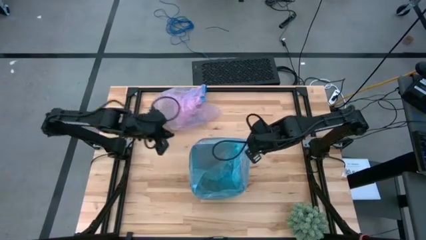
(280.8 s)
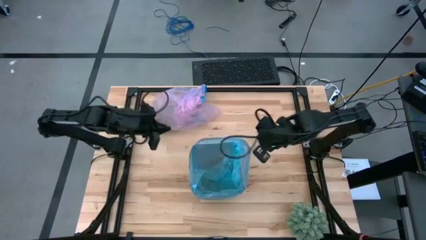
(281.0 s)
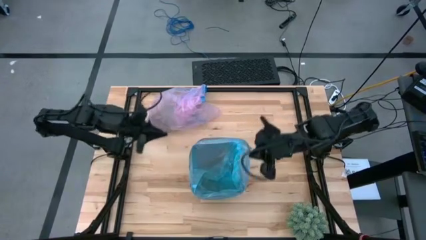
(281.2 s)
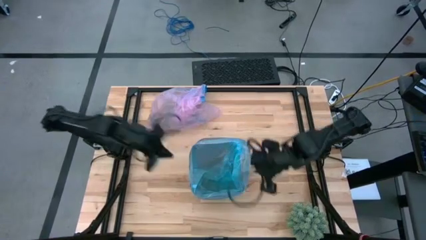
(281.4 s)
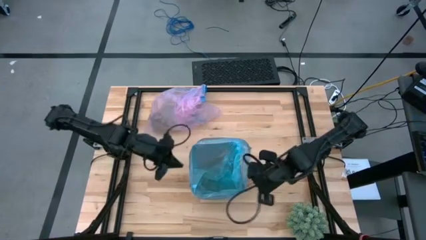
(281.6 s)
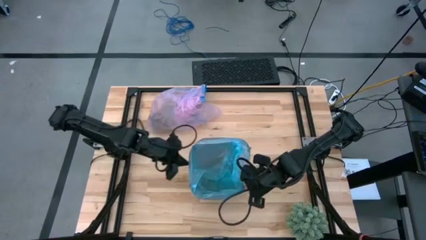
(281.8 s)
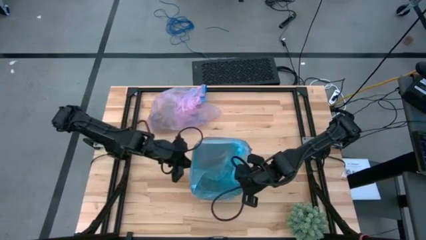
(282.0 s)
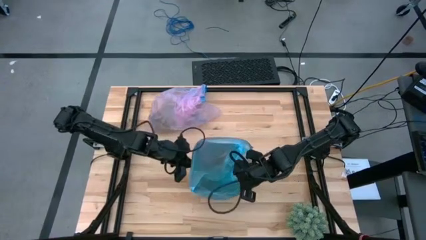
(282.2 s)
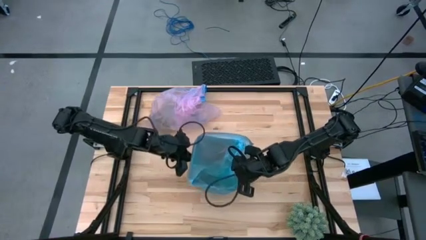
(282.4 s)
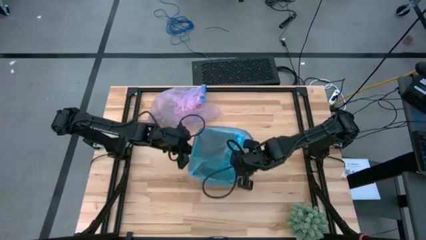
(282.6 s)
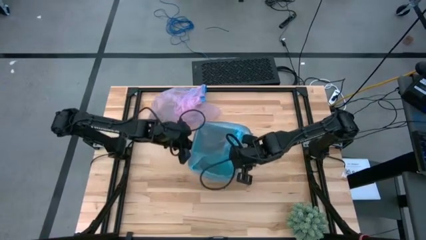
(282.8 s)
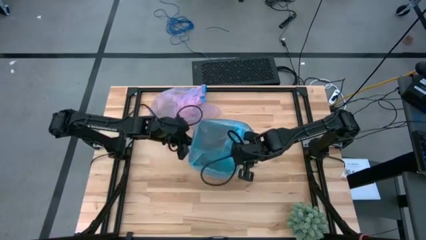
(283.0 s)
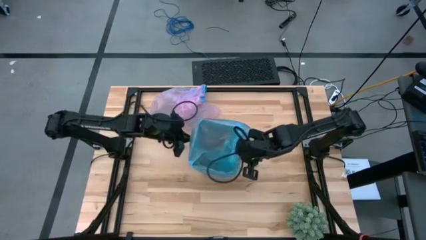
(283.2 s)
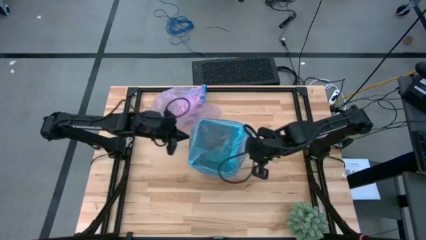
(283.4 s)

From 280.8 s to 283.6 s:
Task: place trash/remove bag and relplace
Adjust the trash bin

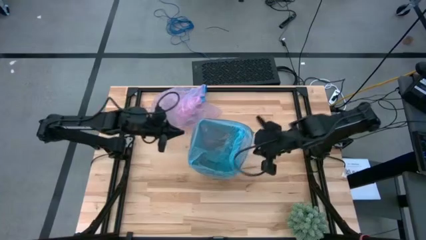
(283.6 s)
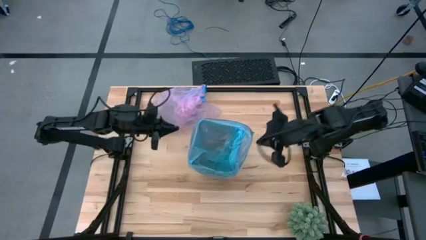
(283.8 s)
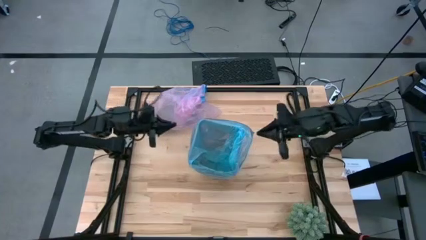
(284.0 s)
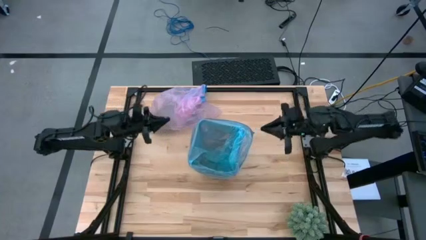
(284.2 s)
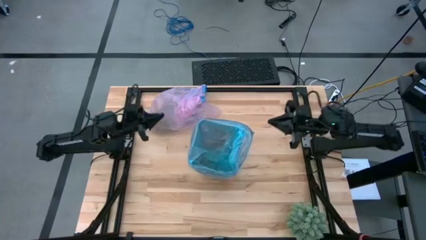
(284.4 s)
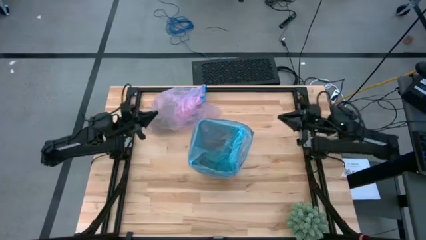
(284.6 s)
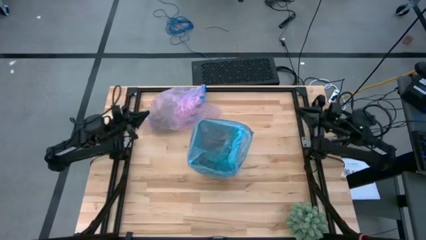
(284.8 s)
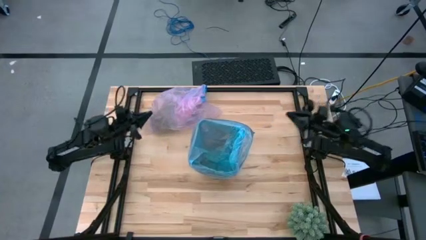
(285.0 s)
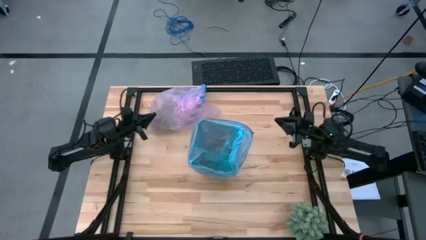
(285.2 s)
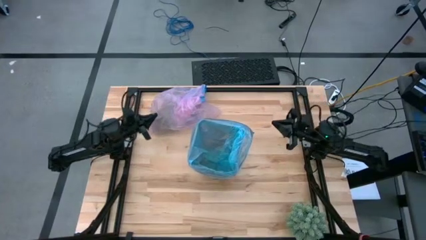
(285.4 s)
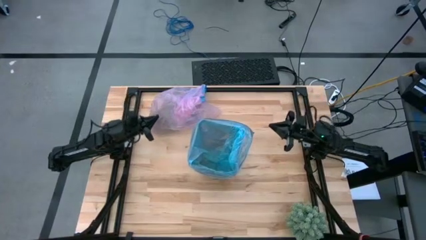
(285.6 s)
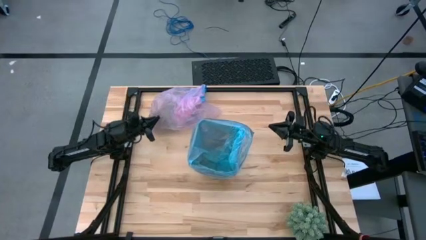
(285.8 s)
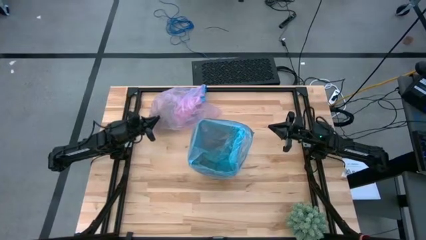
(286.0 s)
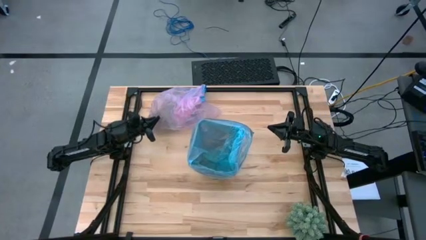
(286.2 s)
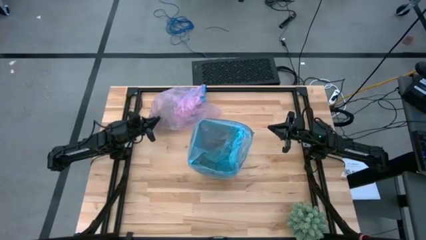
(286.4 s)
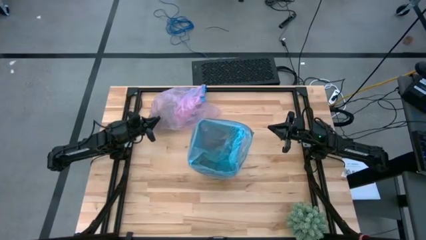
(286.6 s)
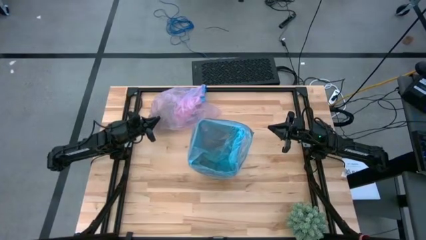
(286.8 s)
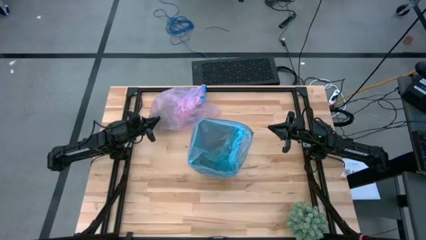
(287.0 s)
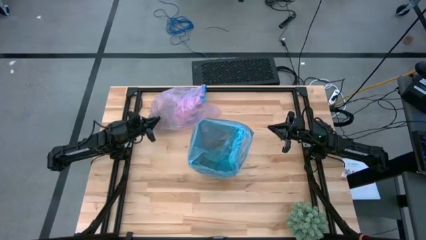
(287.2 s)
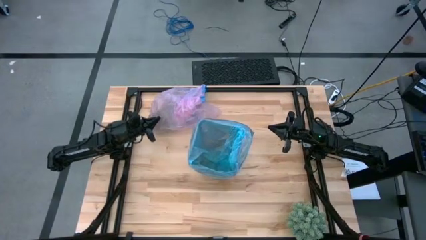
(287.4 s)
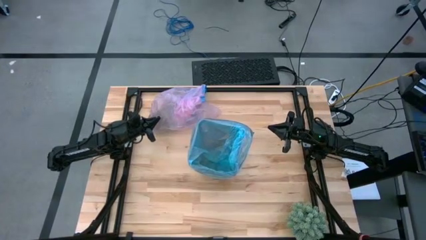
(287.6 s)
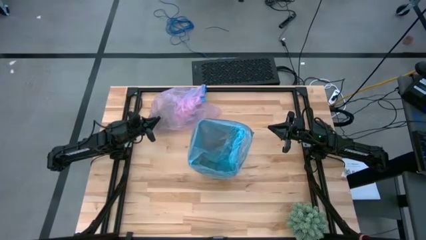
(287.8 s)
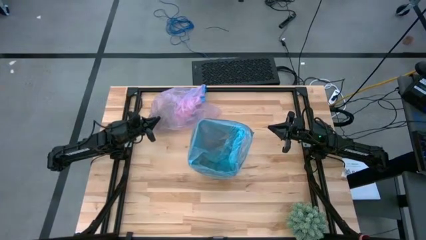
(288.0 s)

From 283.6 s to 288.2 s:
Return to Home Position

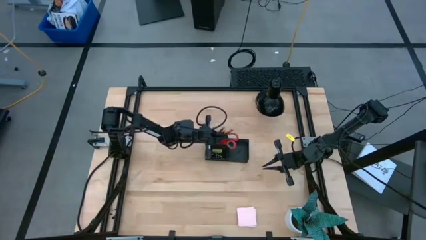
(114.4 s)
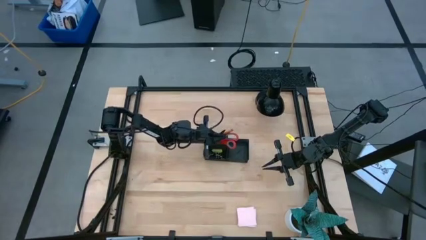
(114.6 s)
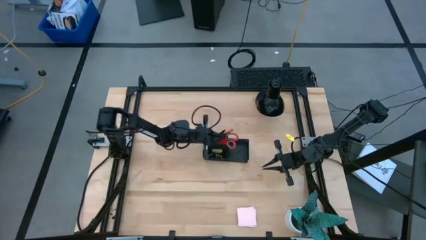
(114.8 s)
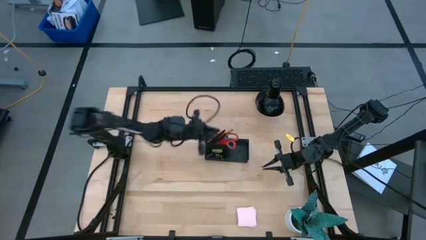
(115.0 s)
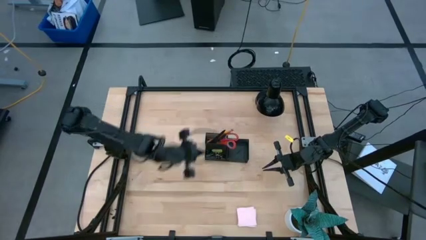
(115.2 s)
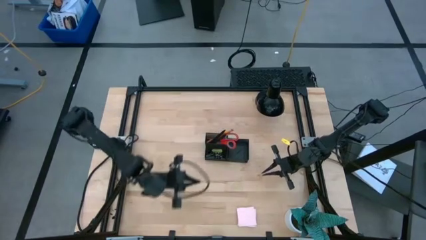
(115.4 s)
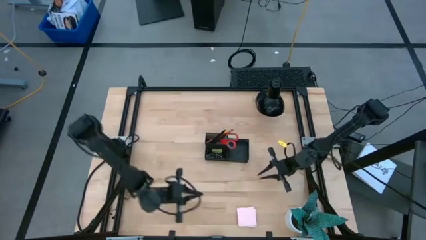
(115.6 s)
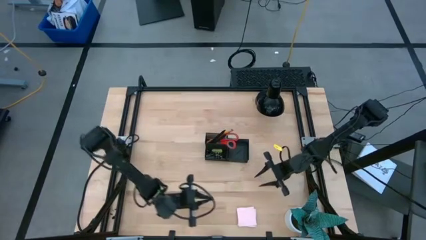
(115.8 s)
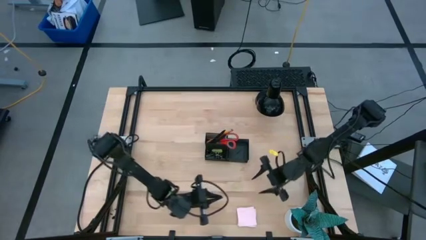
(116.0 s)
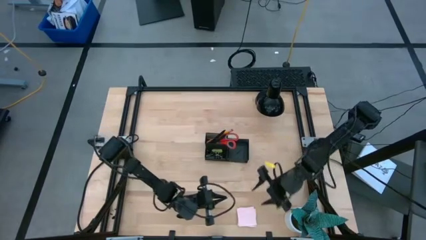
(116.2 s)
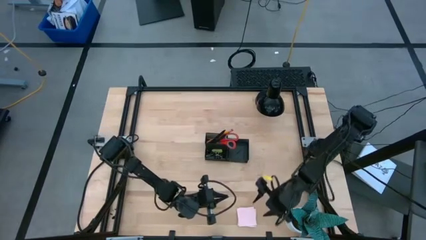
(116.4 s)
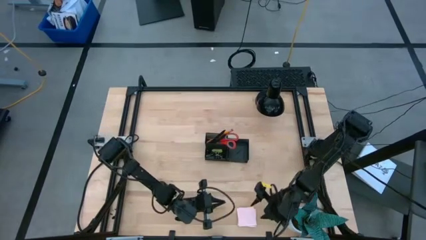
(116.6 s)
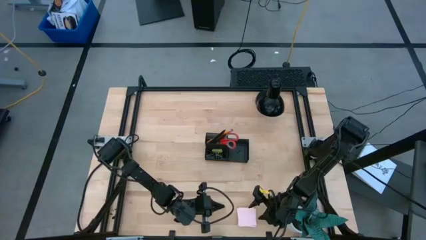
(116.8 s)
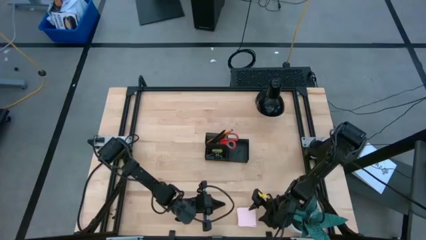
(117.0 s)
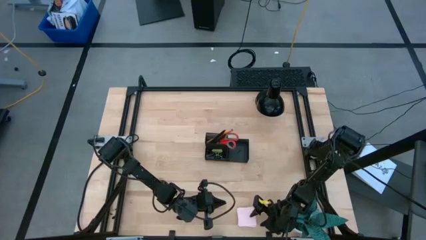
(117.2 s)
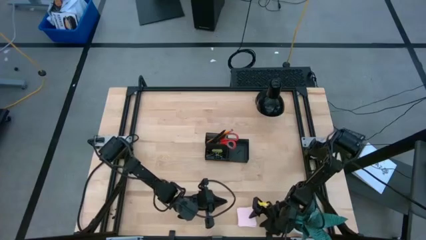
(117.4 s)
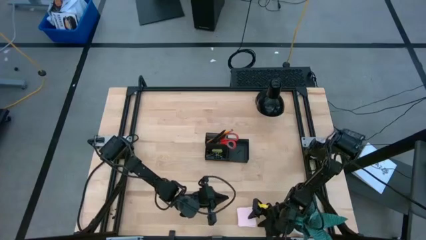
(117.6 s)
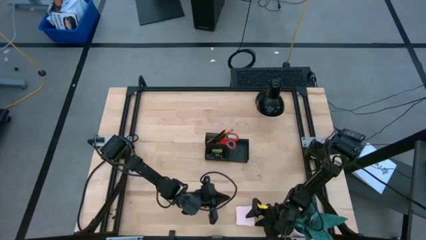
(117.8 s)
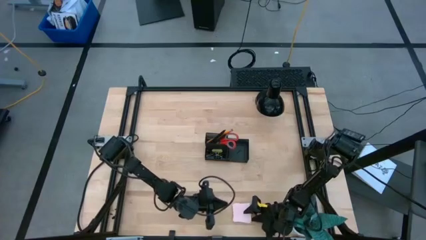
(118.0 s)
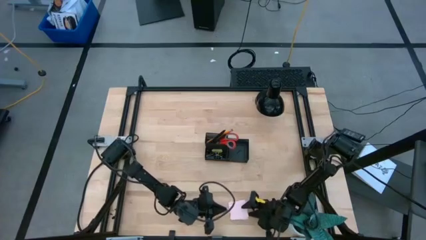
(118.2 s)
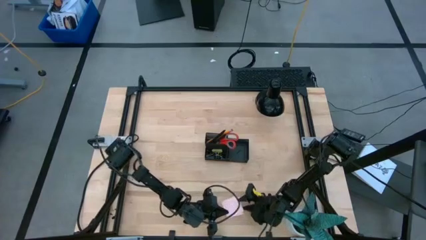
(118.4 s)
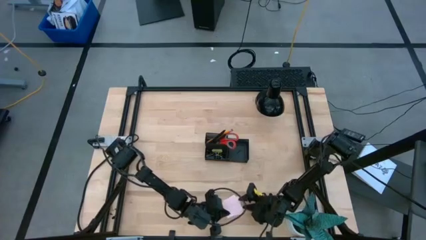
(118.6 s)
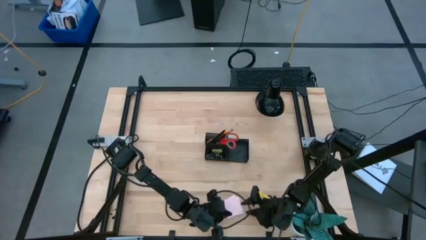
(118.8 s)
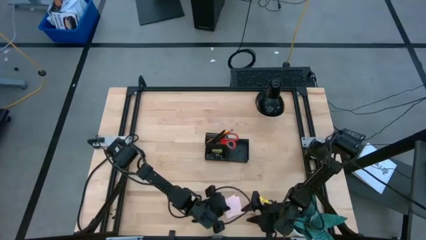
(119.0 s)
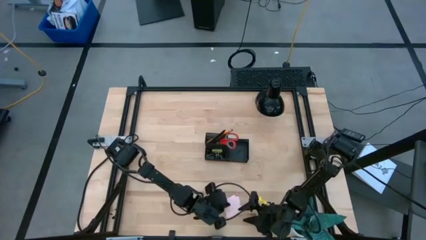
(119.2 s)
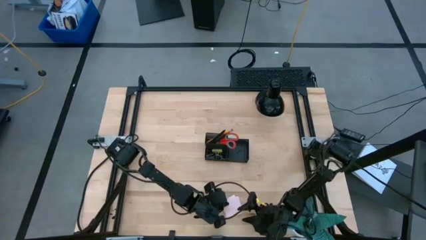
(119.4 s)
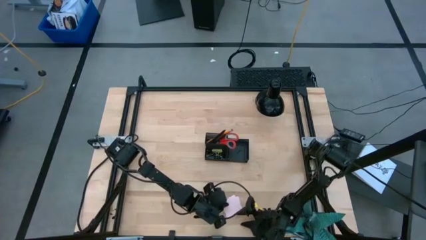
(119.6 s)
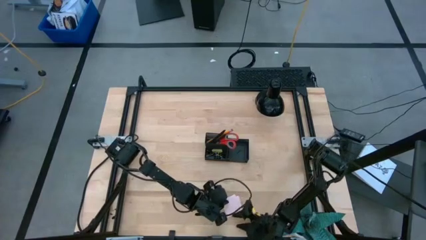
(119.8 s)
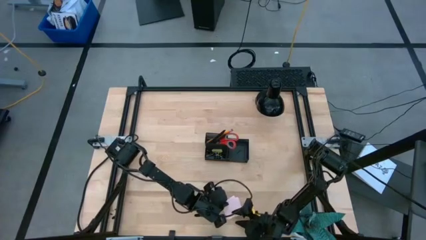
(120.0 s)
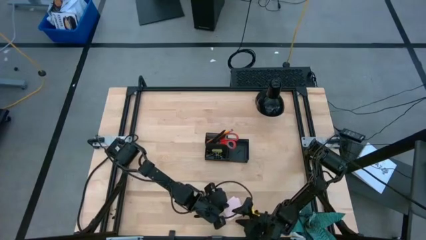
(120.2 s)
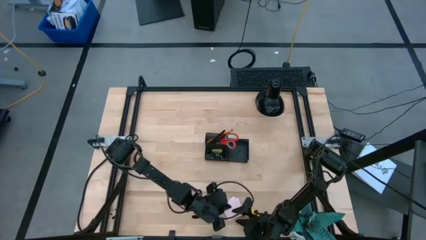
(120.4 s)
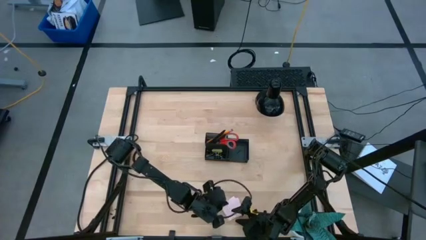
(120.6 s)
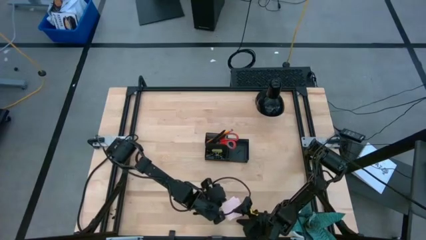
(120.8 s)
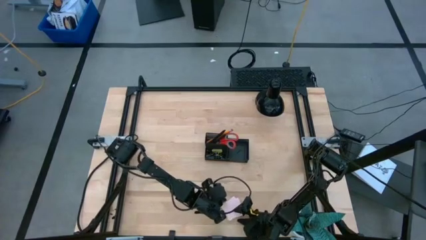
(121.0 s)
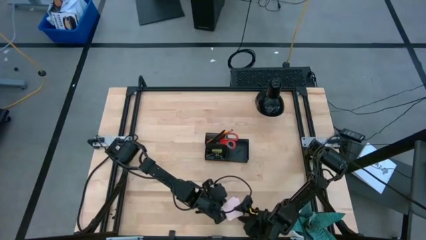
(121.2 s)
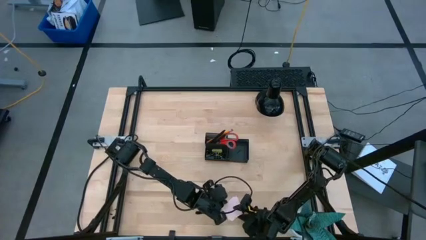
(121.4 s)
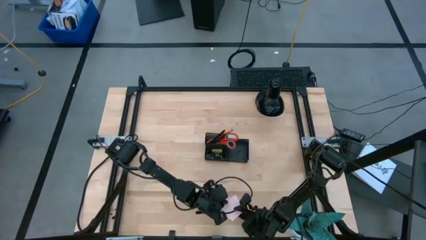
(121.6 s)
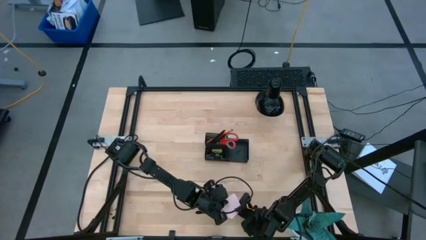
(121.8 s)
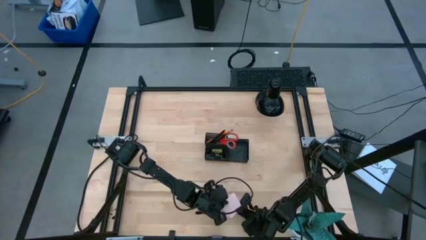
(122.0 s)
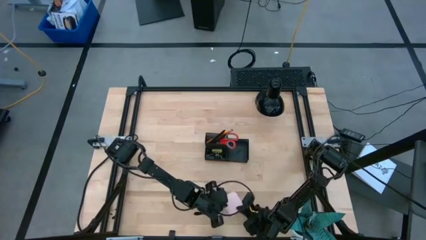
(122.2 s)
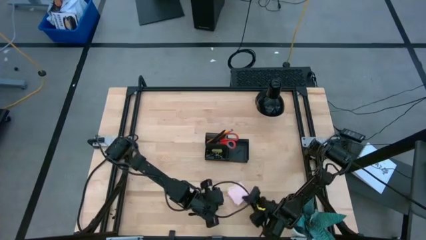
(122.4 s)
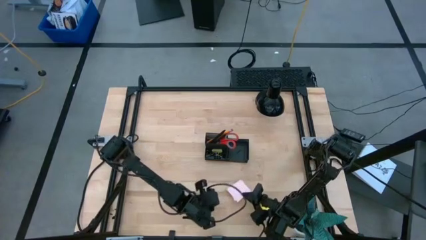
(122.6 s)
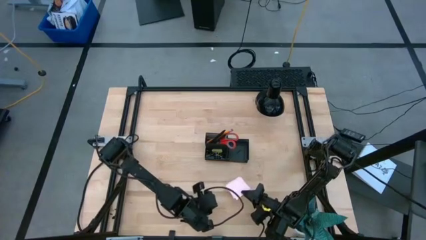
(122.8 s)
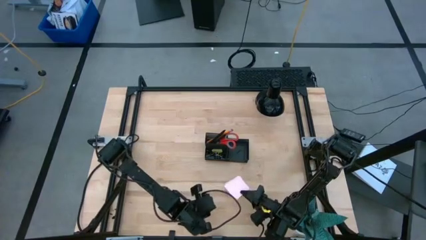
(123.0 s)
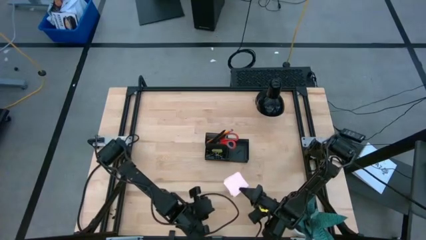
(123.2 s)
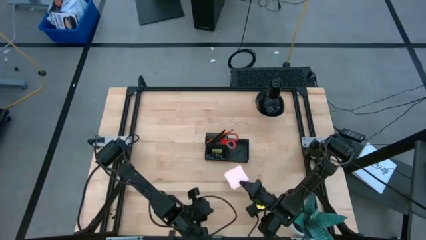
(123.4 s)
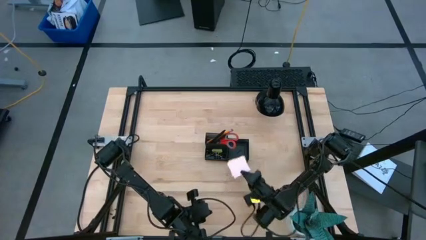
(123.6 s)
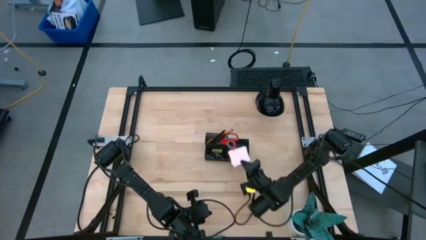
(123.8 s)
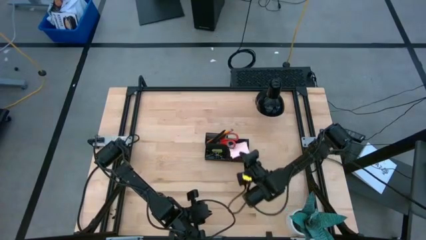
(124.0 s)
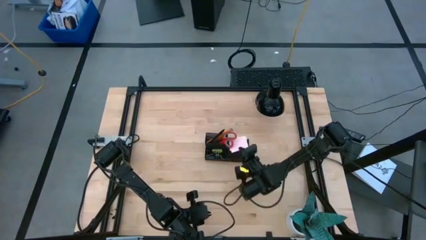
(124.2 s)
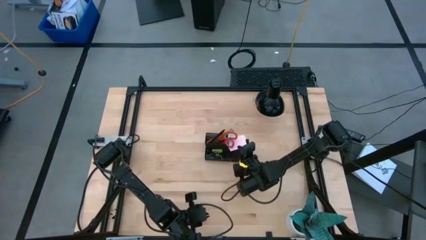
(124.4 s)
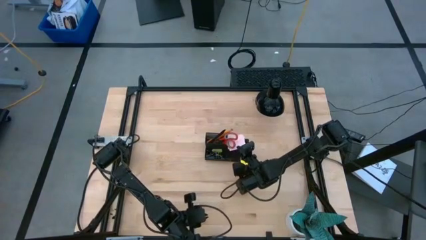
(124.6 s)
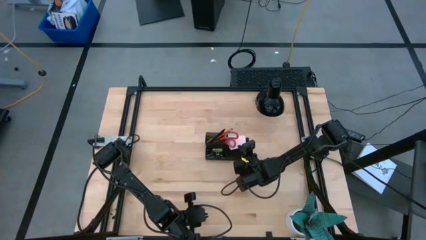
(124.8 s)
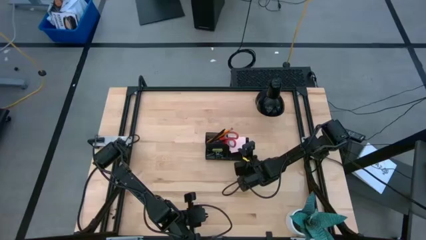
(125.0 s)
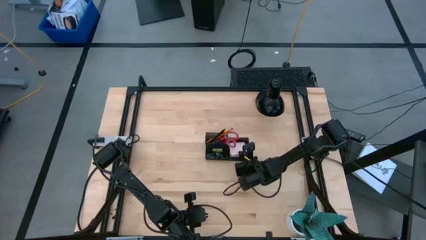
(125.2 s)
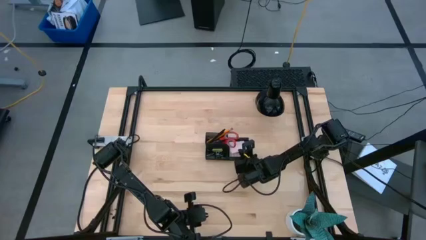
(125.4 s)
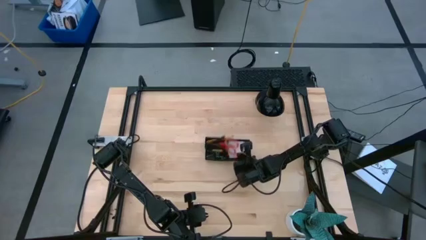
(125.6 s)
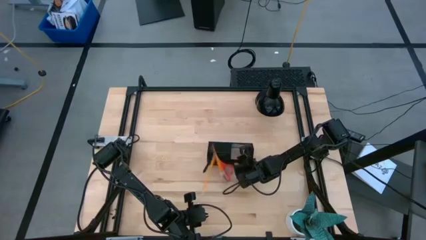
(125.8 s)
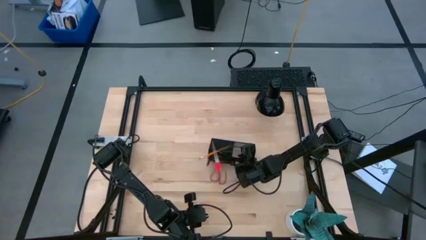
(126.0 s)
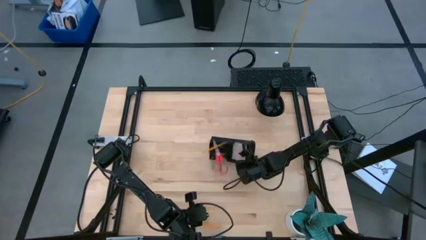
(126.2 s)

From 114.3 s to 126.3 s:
Task: Pick and place office supplies into organizer
Put the pink sticky notes into the black desk organizer
